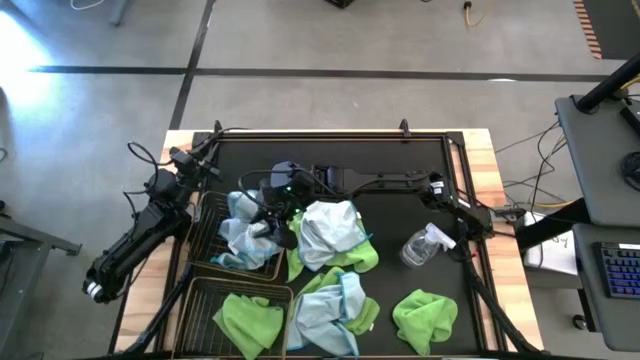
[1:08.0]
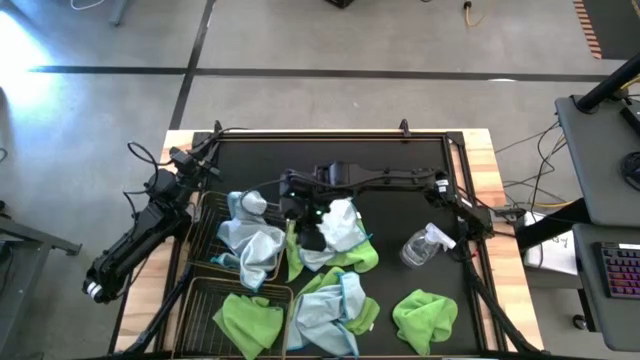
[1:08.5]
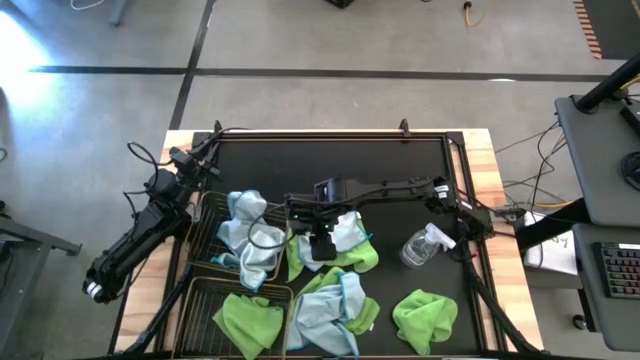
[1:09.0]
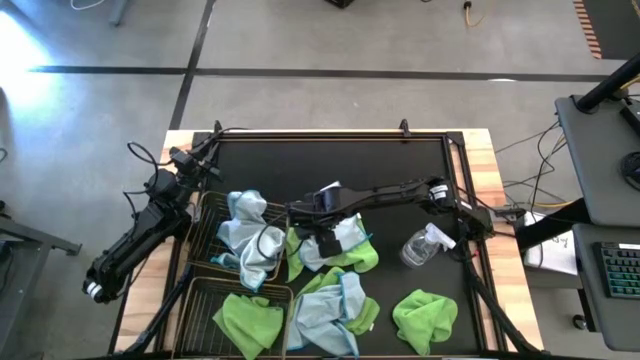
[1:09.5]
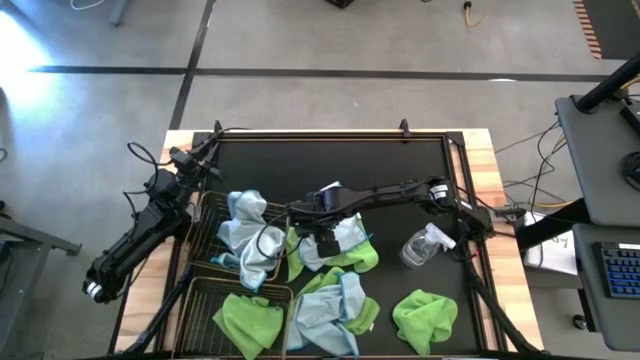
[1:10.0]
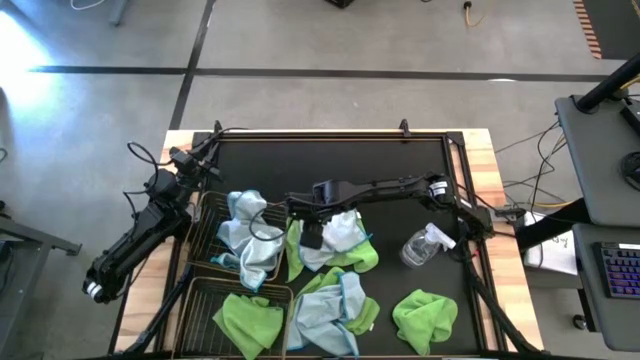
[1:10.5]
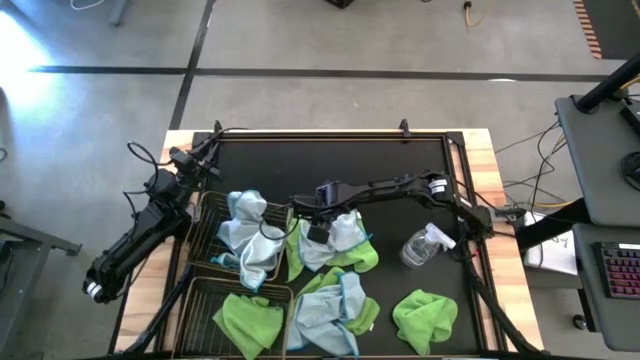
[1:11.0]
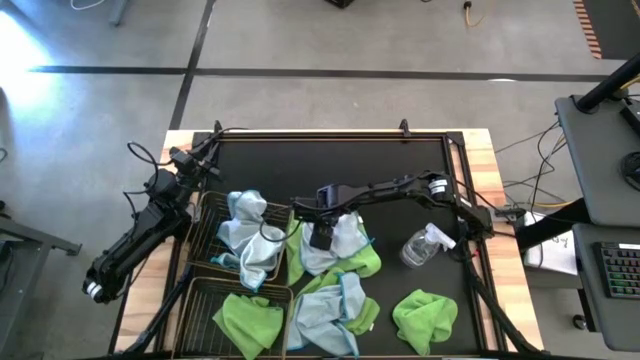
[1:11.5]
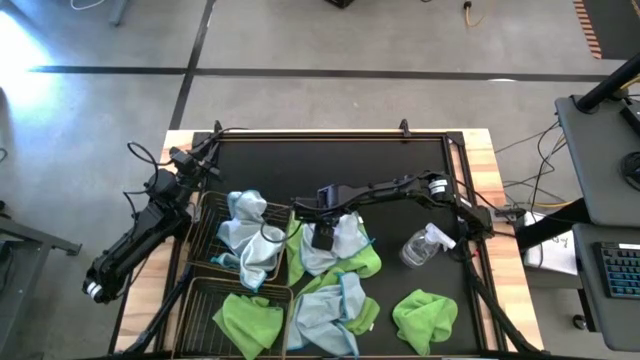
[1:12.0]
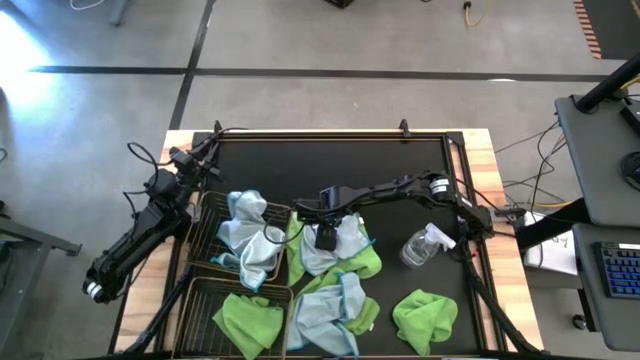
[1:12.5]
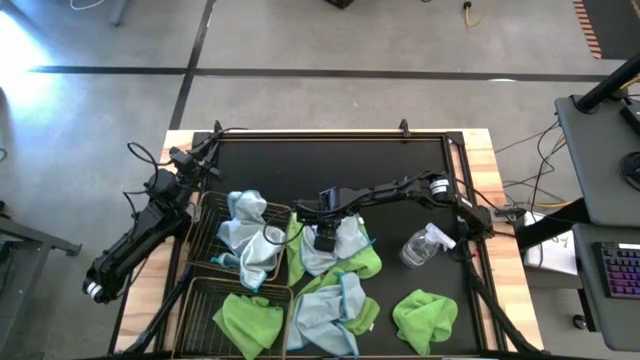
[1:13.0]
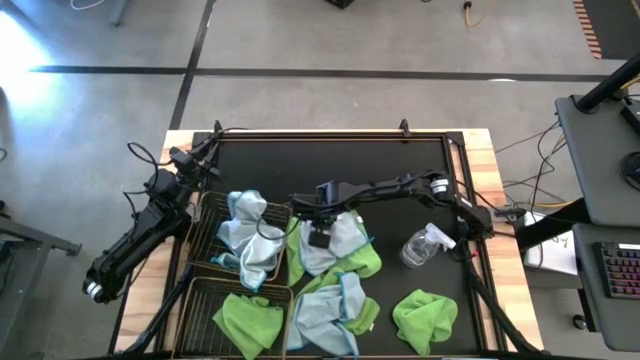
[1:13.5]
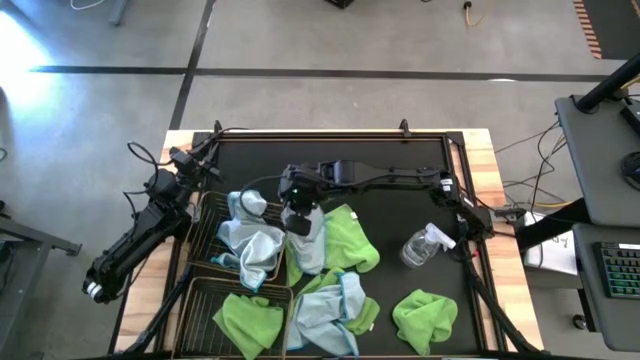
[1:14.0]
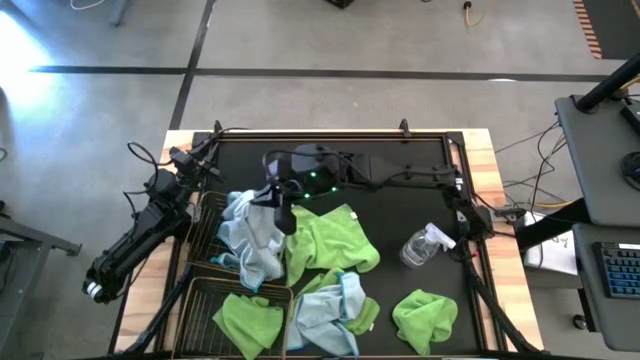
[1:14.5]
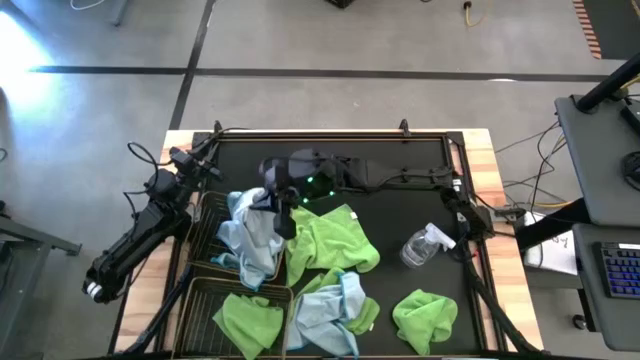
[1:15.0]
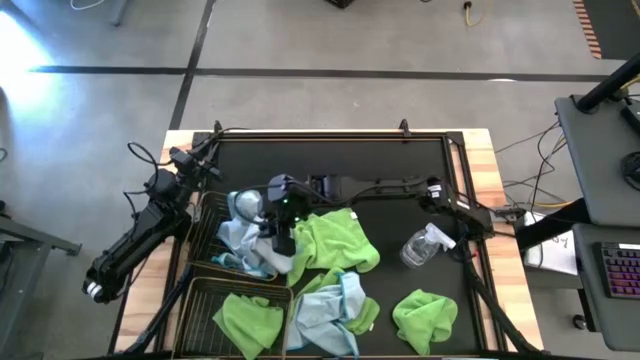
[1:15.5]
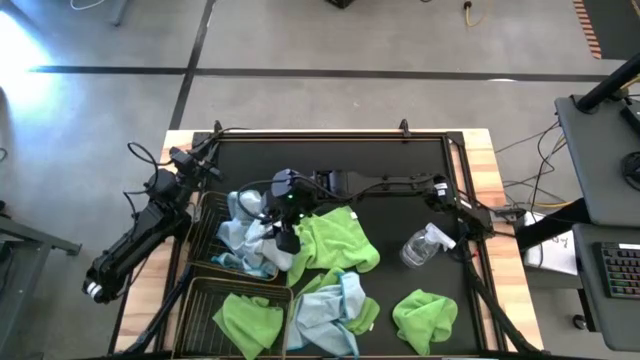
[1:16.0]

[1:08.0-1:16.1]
Task: Sort microfiber towel by color & place in baskets
Put the top light blue towel into the top wire basket

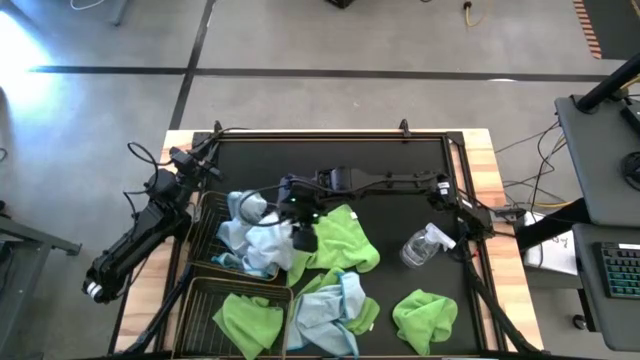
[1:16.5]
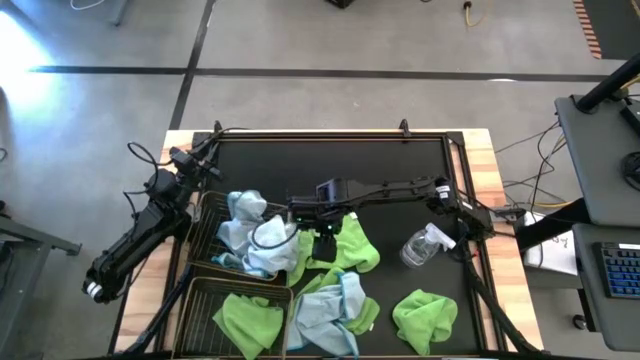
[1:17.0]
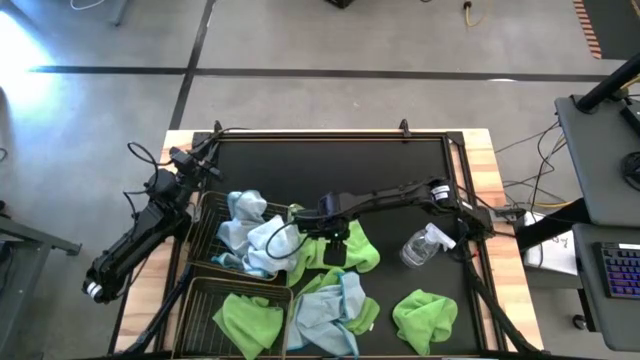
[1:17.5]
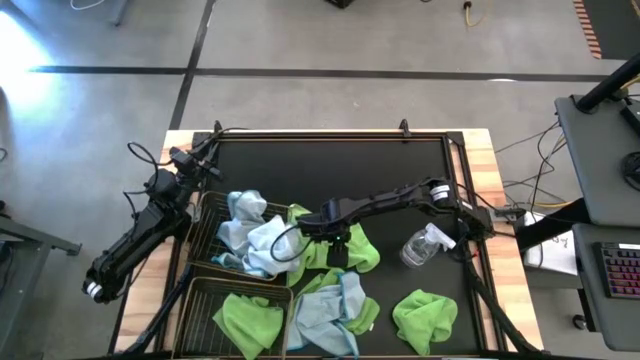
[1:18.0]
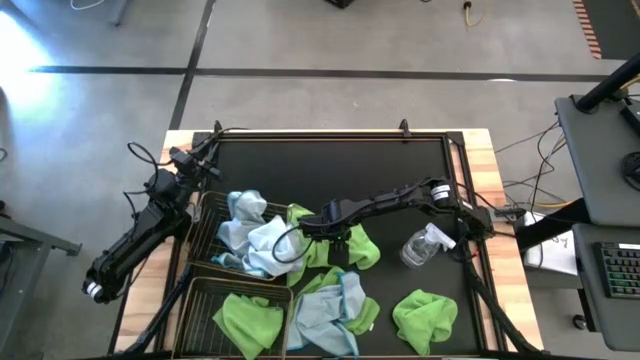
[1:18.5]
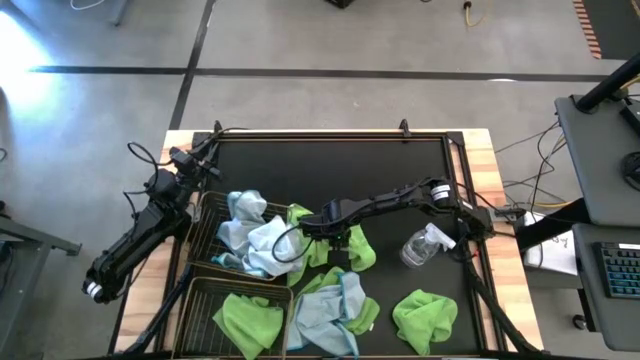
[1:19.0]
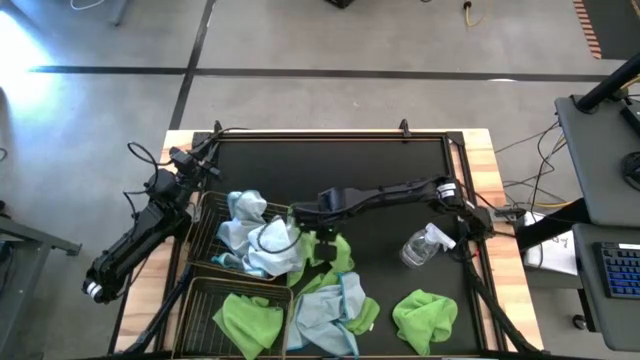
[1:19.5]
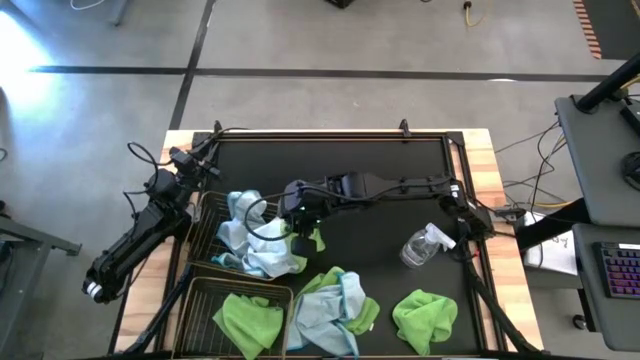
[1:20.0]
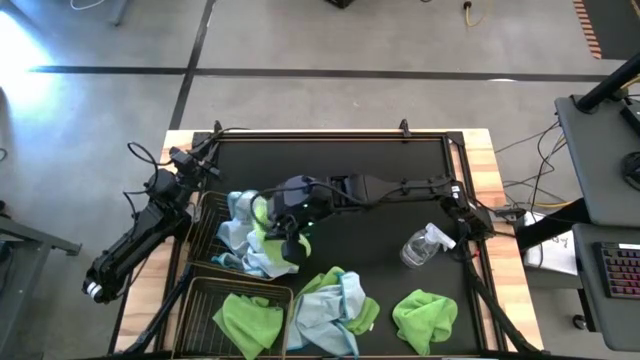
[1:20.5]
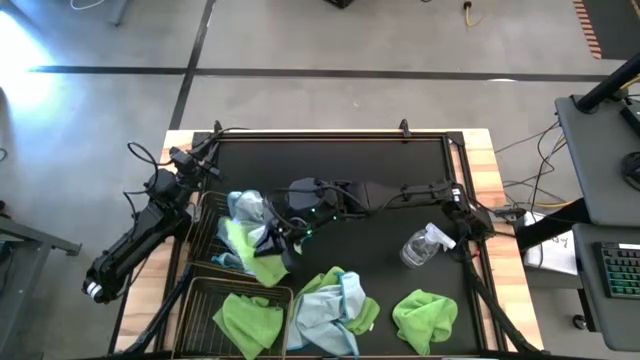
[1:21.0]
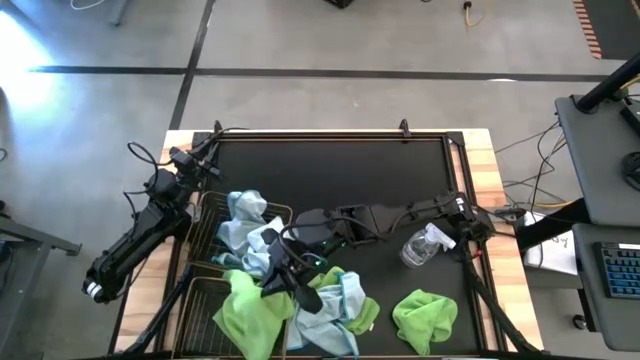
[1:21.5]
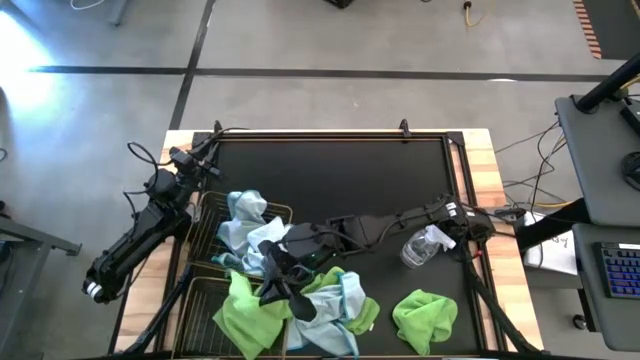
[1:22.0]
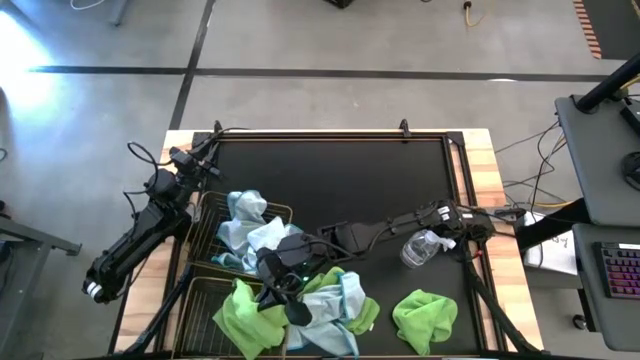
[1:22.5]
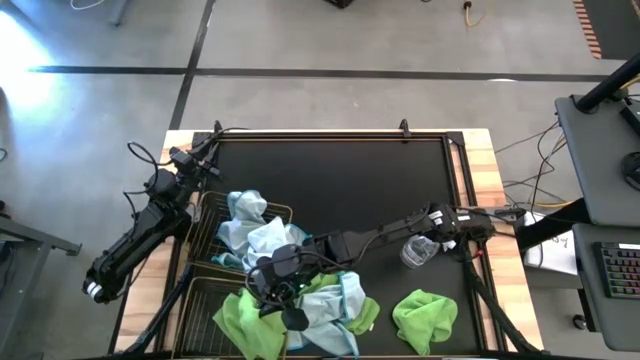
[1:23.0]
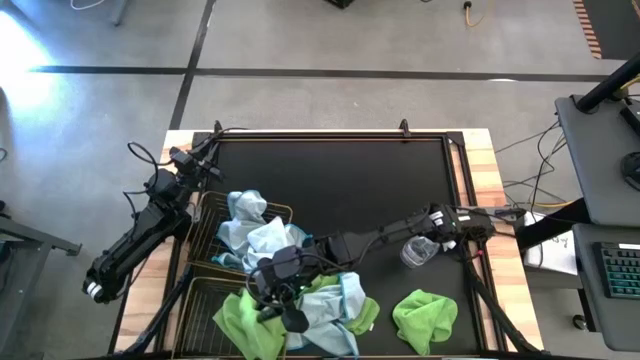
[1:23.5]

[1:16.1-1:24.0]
Put the top center green towel into the bottom wire basket

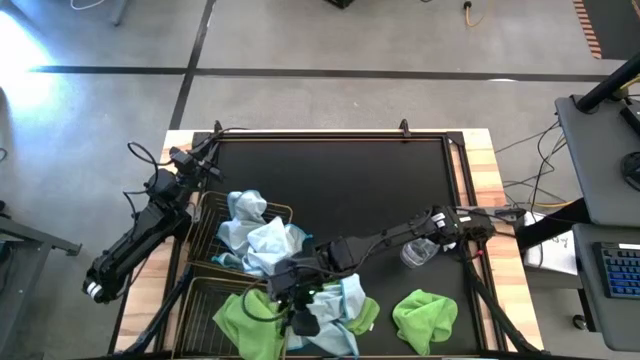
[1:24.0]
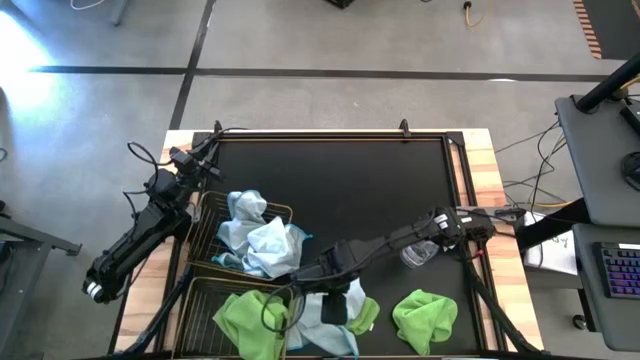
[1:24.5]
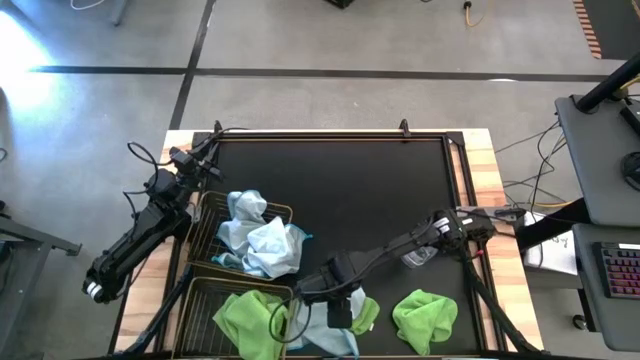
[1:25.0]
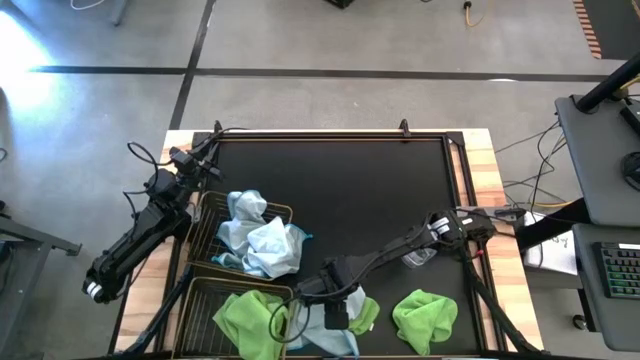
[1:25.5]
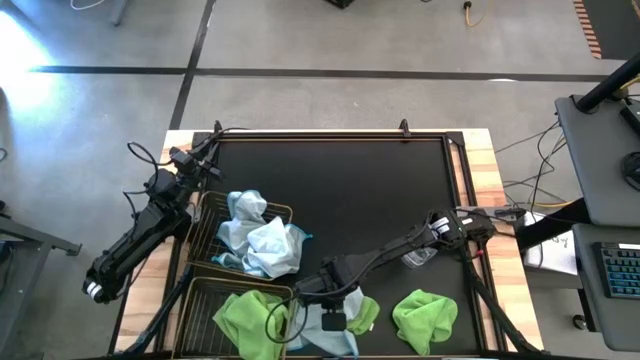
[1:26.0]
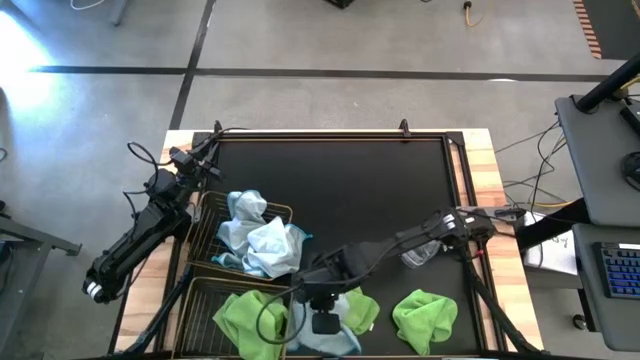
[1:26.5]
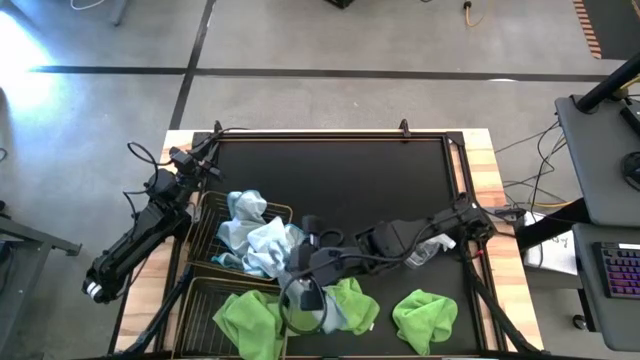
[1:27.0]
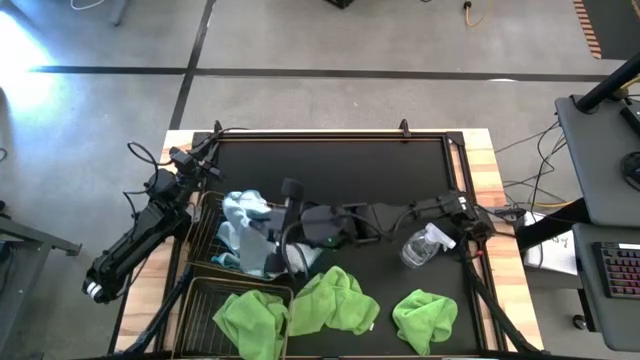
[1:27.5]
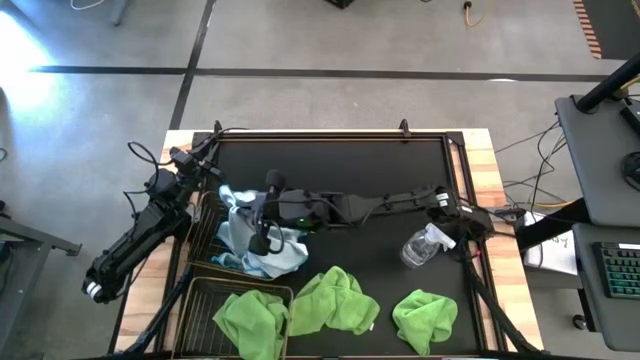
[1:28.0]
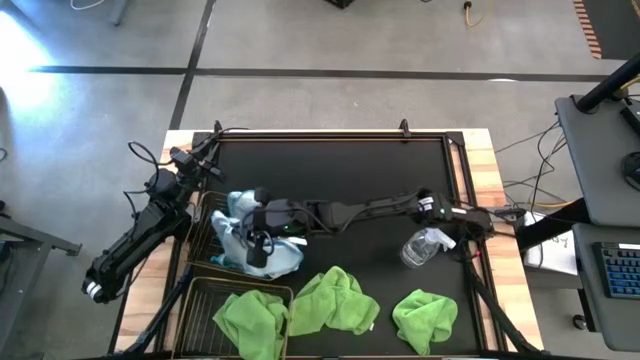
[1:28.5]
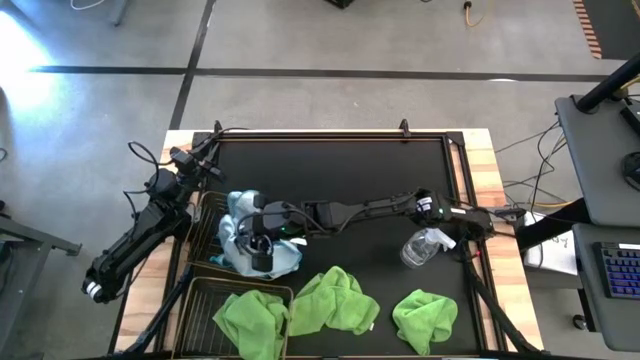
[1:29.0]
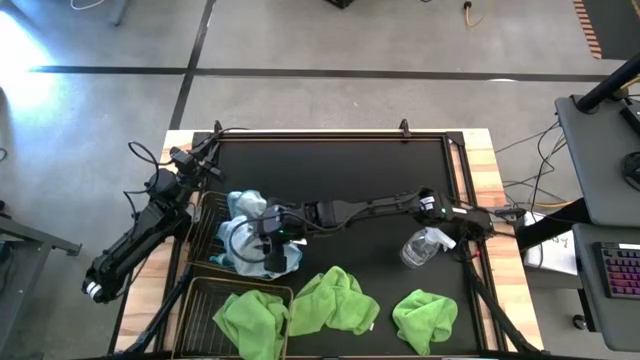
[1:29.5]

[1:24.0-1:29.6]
Put the light blue towel into the top wire basket
